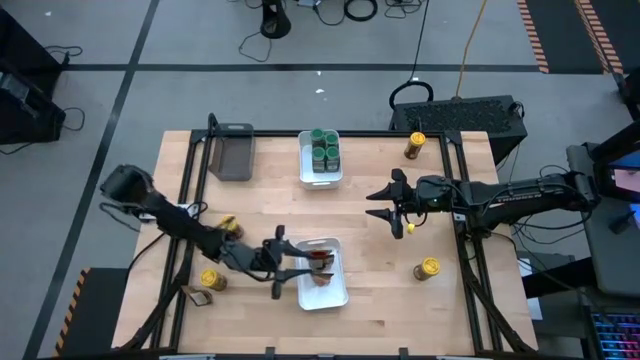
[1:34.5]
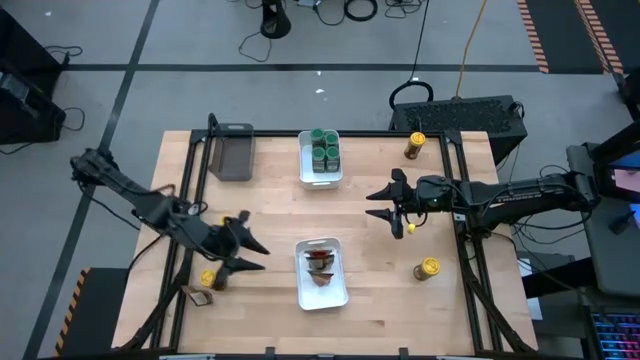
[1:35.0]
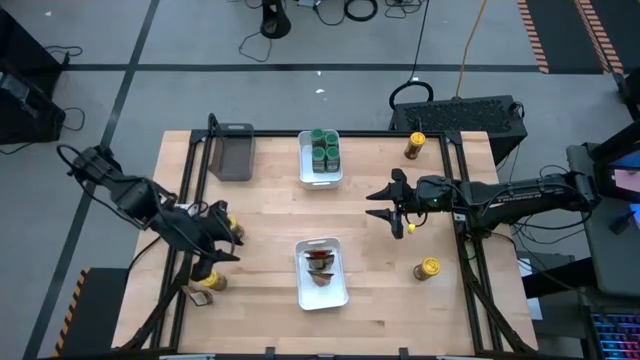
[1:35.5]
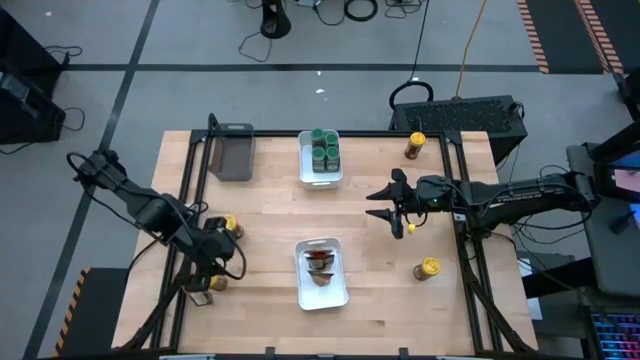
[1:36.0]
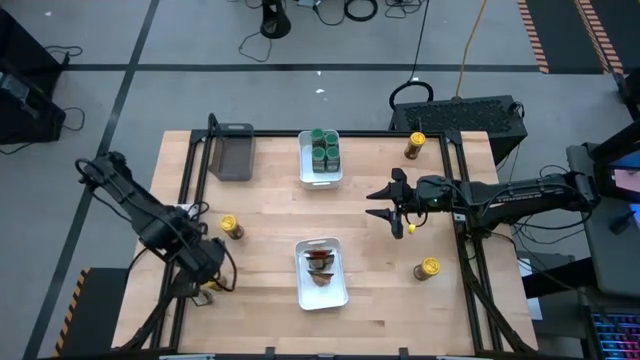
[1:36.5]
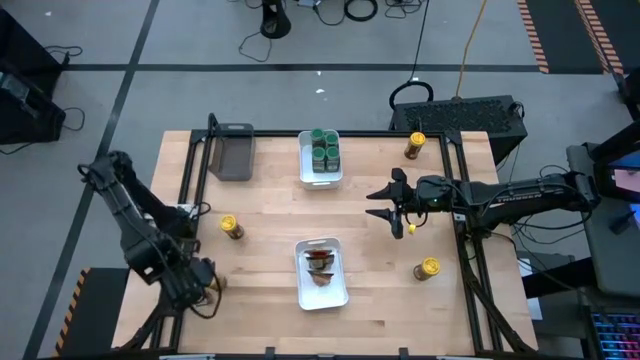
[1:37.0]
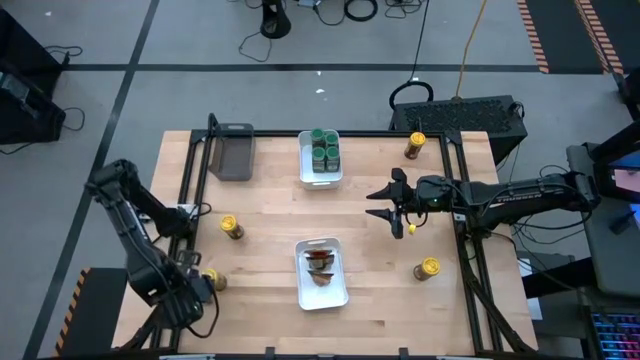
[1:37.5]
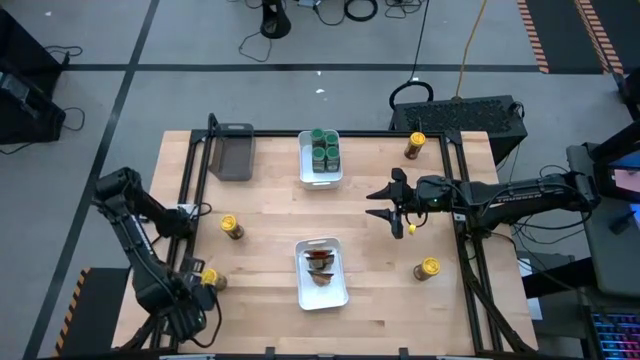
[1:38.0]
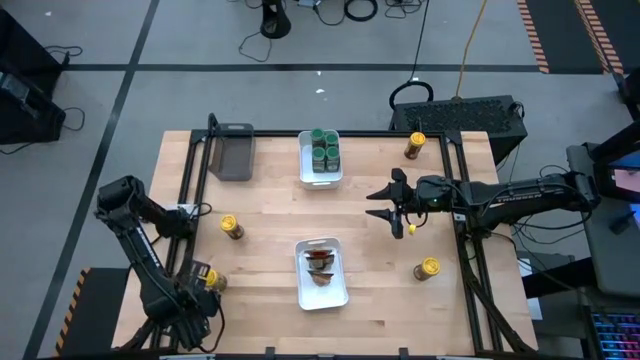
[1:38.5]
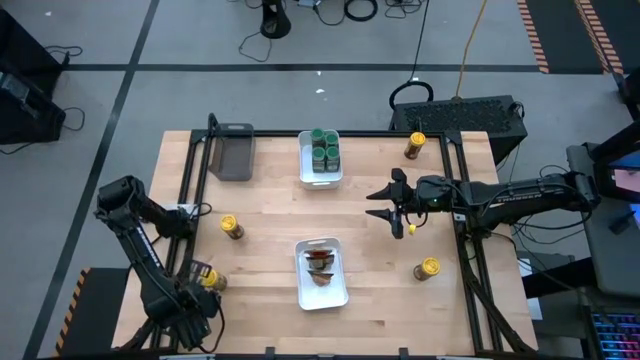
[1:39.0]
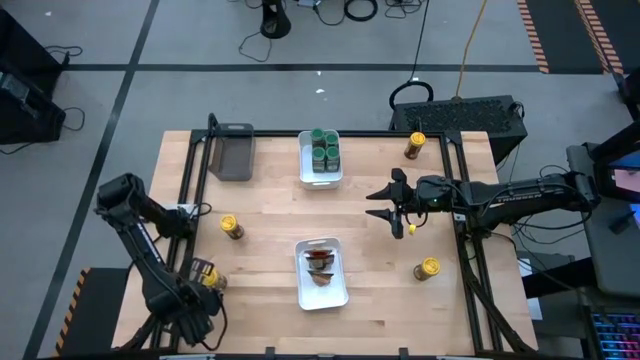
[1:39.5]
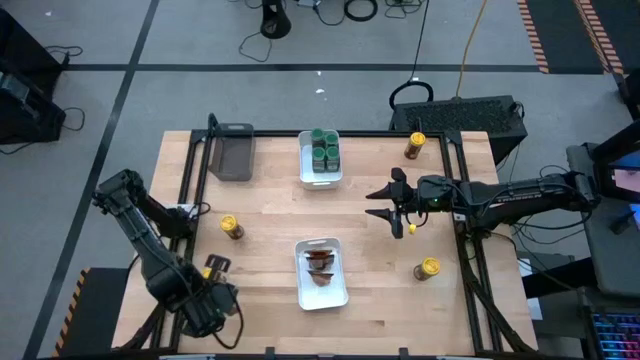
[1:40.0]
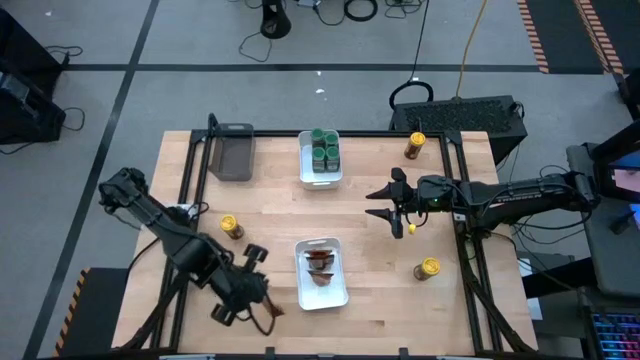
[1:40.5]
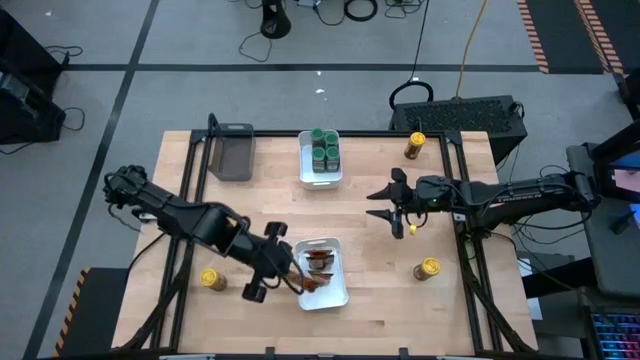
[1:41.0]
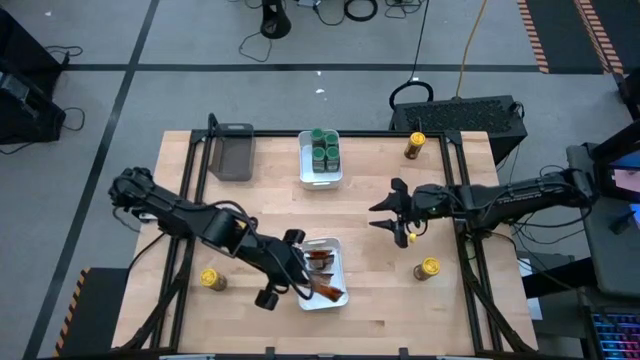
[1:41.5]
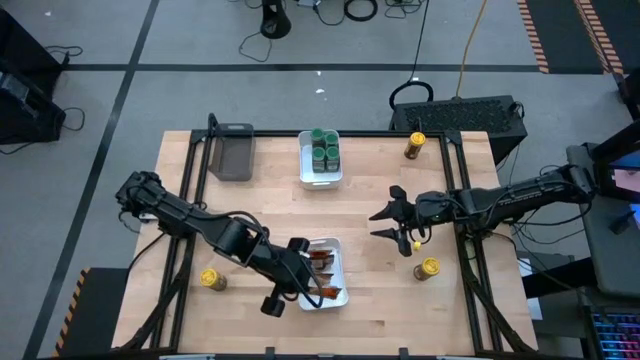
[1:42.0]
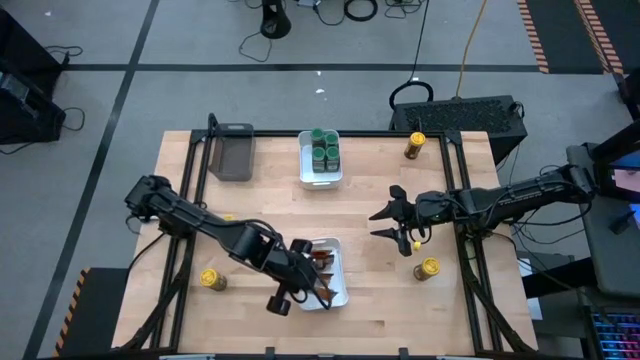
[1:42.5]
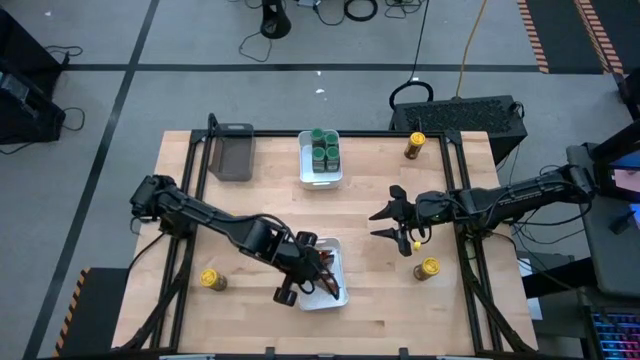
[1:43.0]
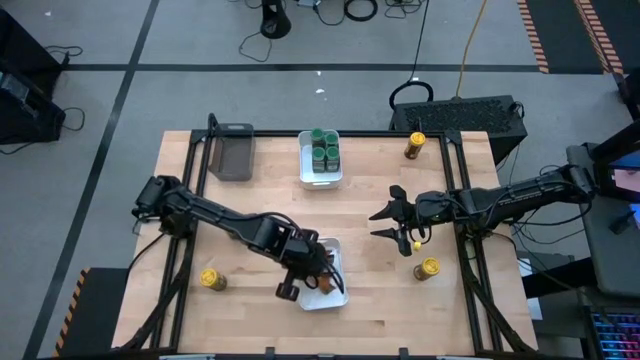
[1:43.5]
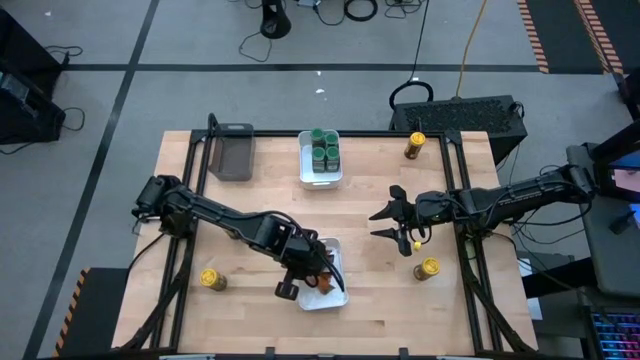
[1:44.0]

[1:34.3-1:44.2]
Task: Sort spices by type
Put the brown spice pack into the bottom white bin

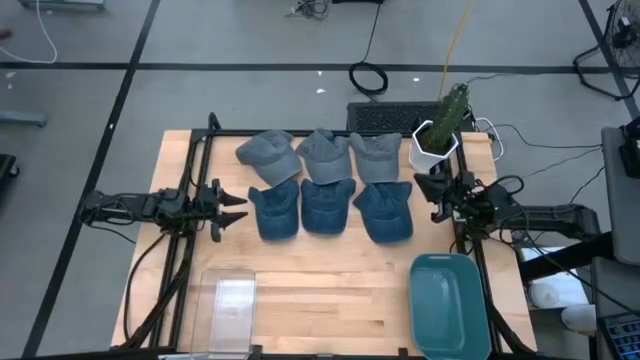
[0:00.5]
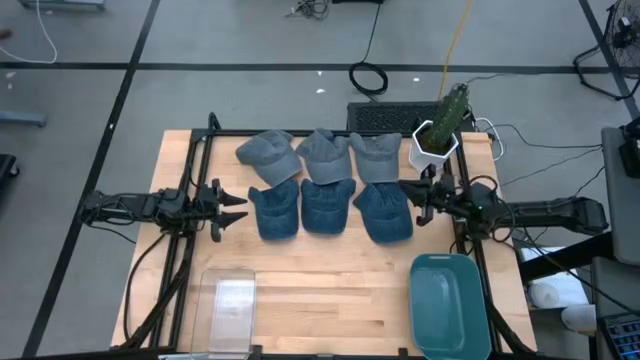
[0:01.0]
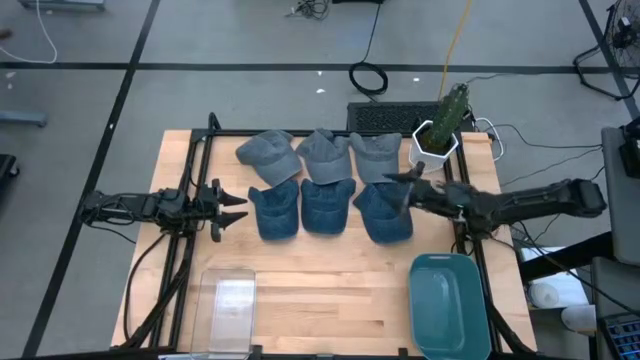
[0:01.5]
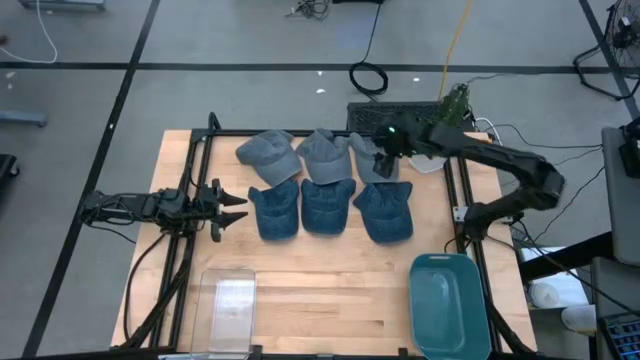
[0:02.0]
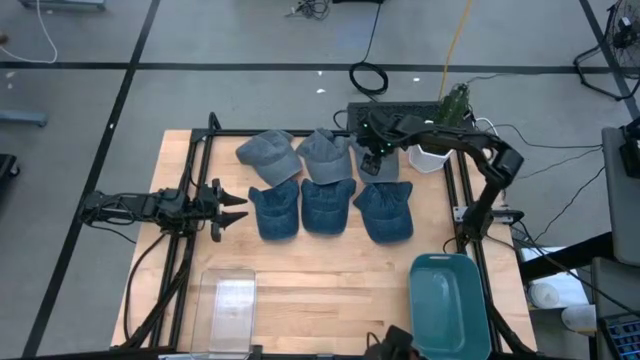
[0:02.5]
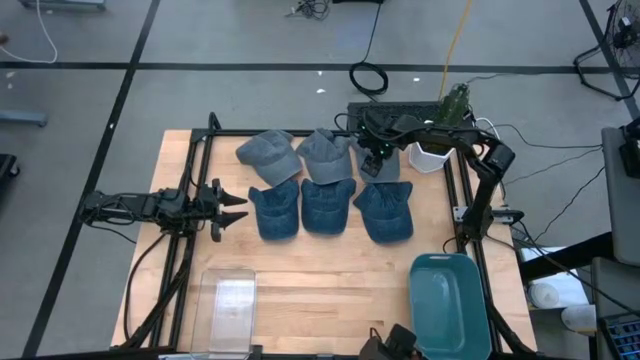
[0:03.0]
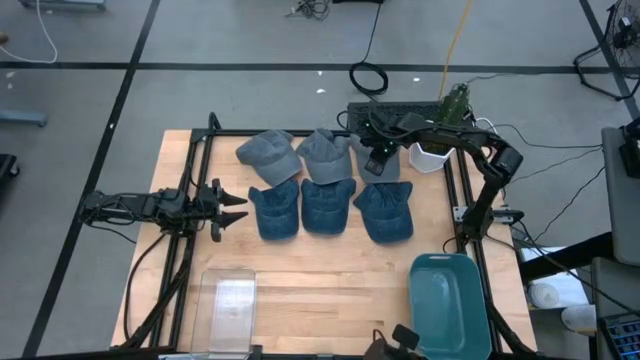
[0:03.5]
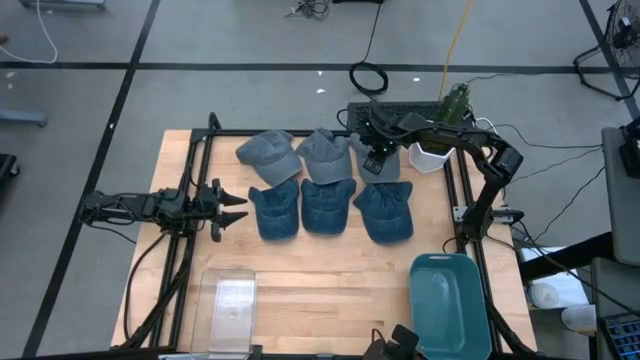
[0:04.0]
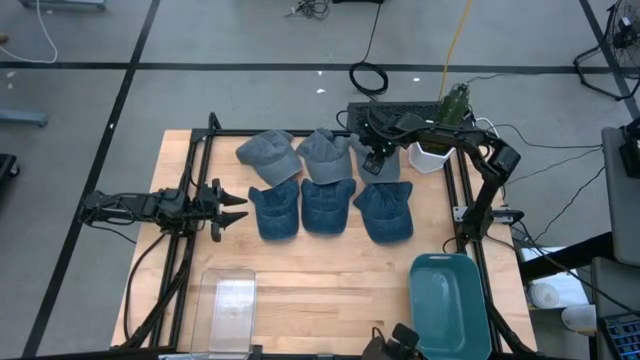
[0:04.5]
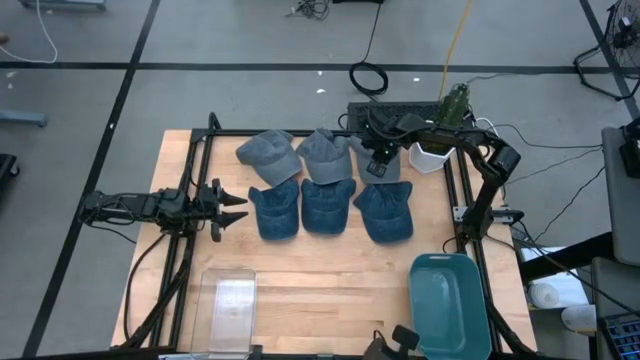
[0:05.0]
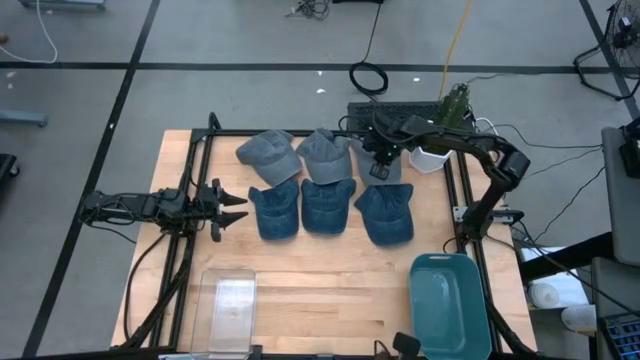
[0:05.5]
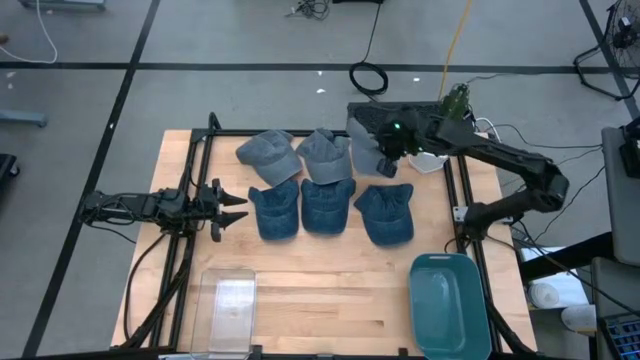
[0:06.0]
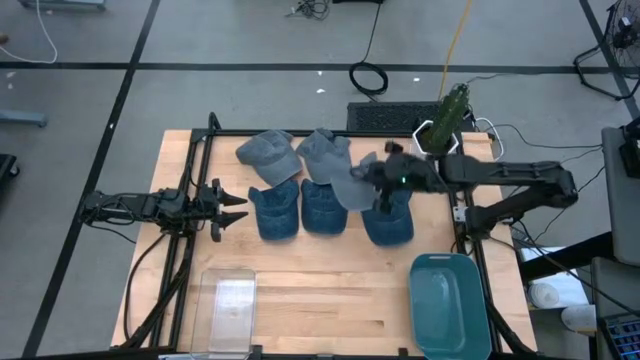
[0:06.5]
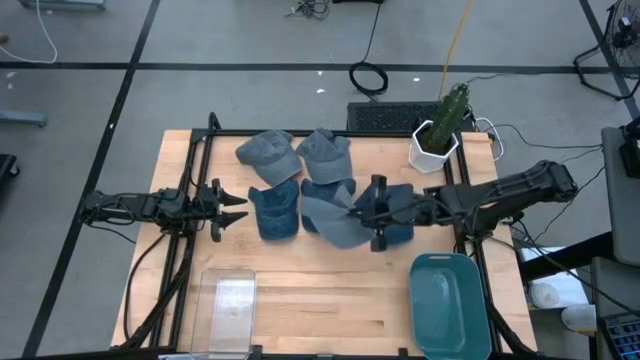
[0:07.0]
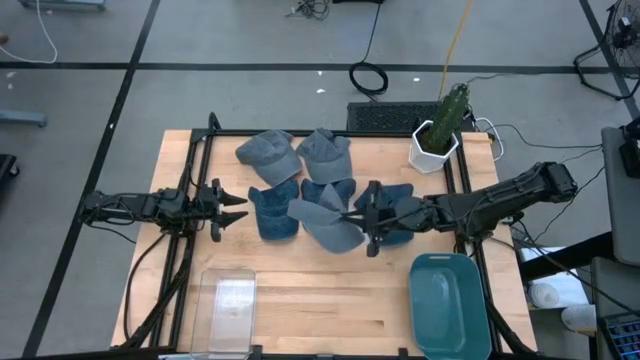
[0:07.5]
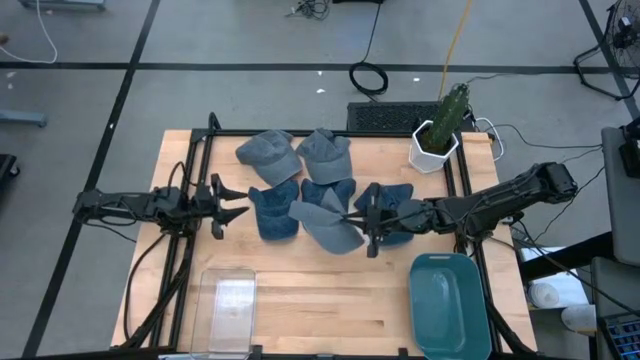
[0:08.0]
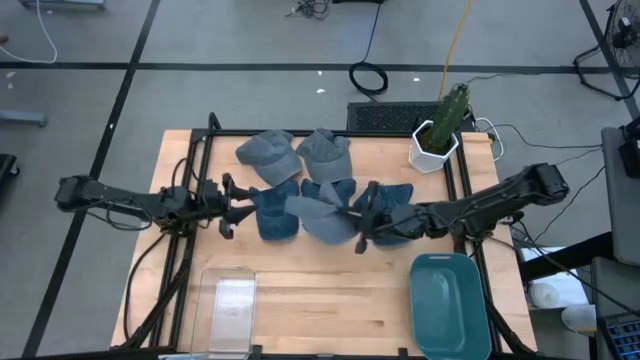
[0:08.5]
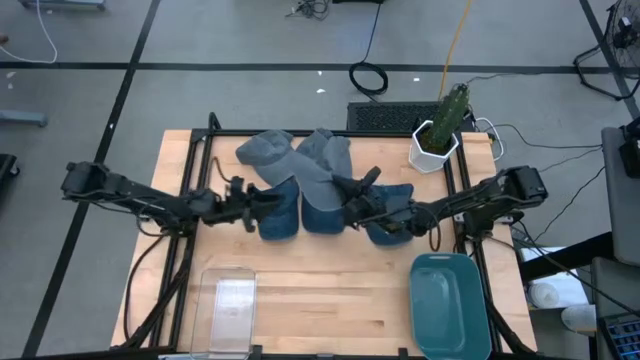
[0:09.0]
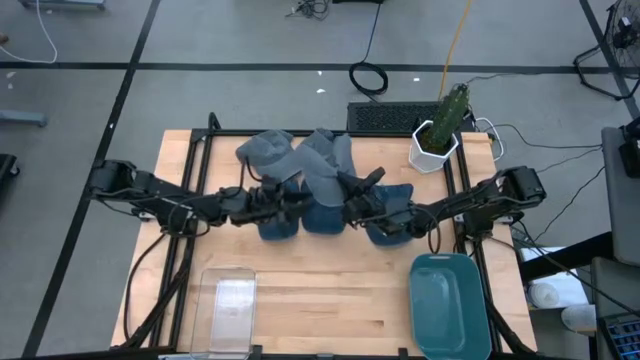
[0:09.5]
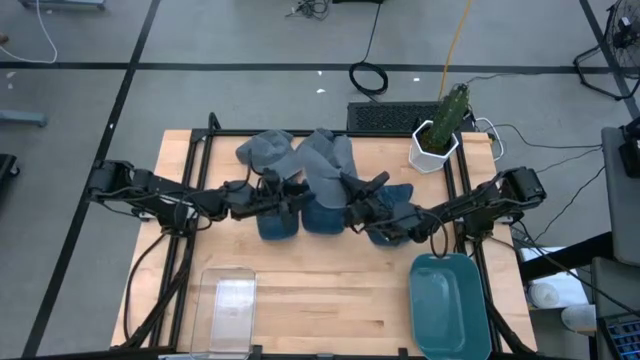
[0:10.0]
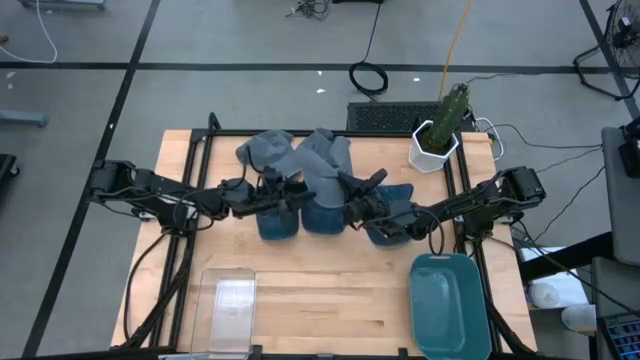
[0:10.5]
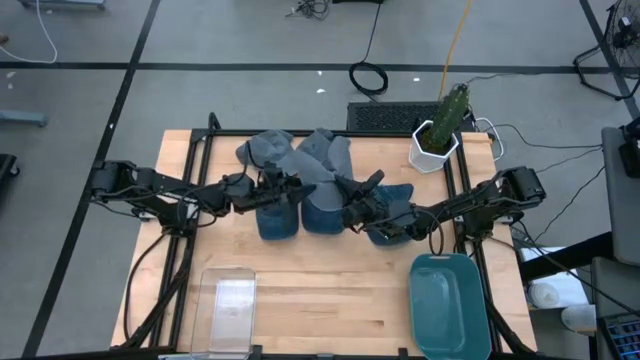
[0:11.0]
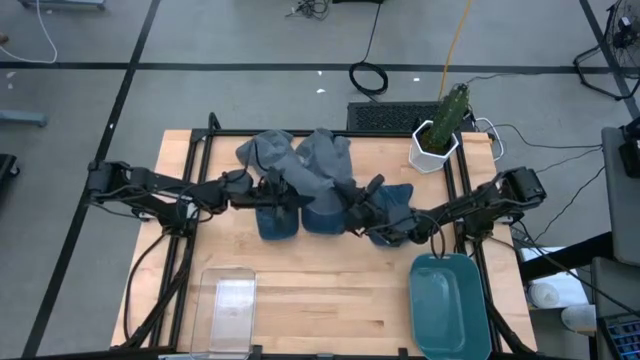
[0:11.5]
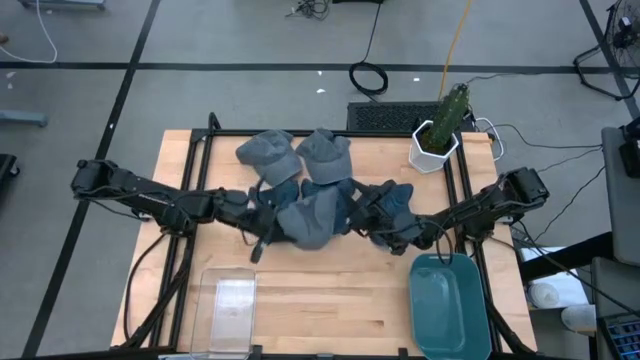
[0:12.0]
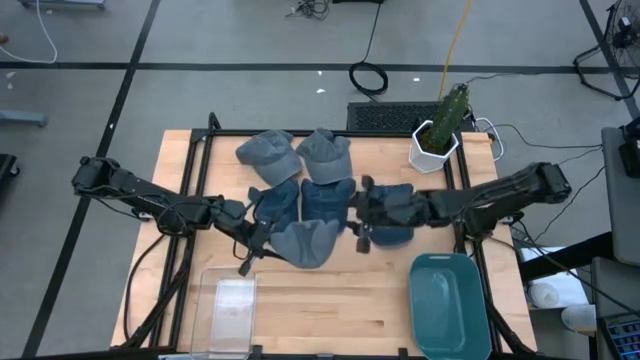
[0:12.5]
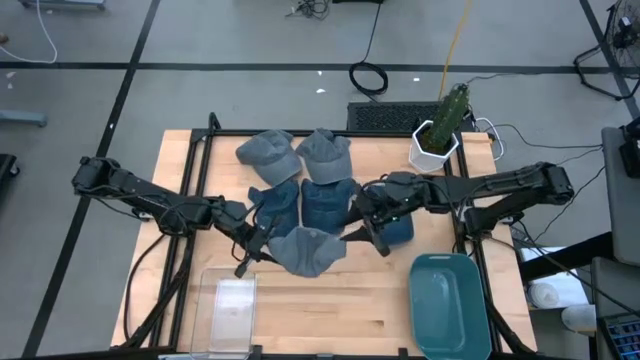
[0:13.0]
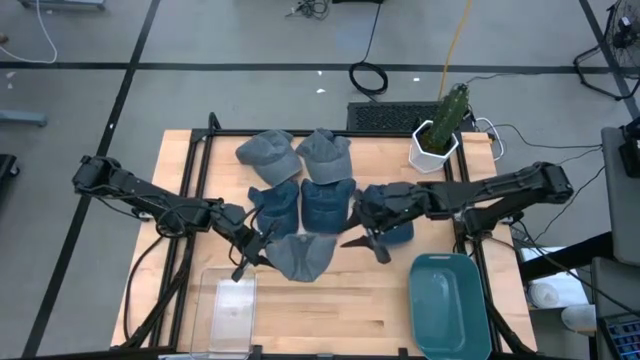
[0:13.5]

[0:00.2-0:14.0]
Task: Pick & Place hat
Put the right gray cap into the transparent bin
